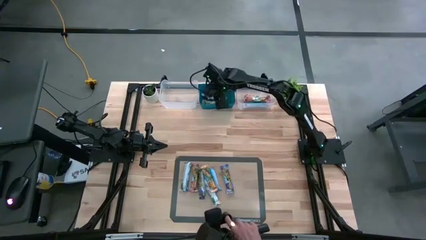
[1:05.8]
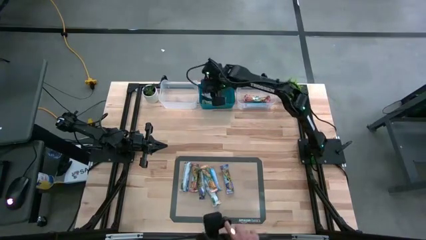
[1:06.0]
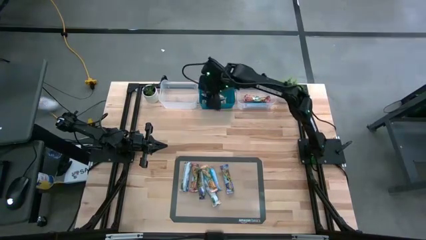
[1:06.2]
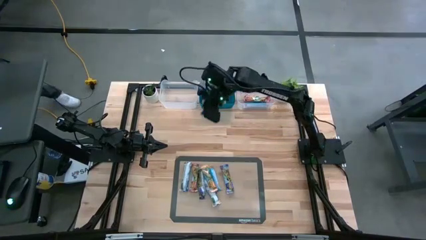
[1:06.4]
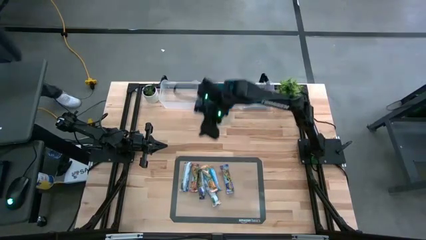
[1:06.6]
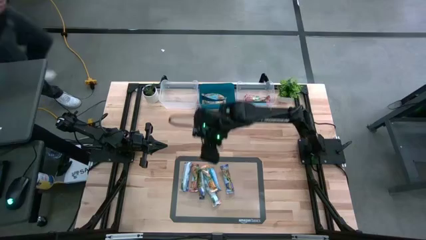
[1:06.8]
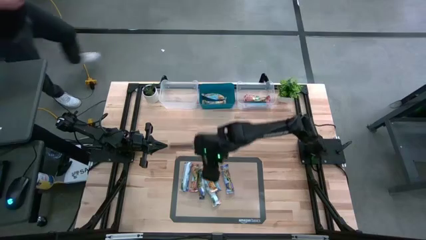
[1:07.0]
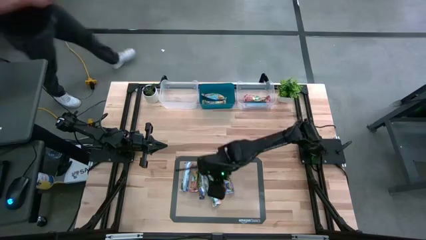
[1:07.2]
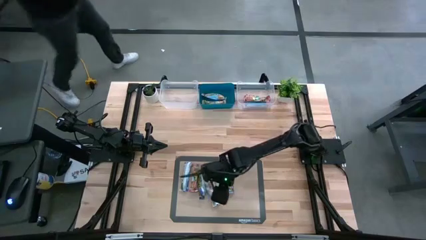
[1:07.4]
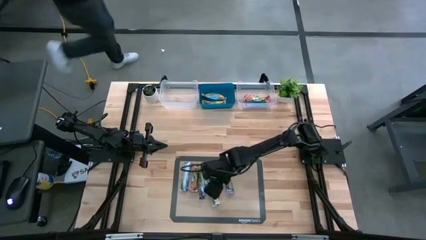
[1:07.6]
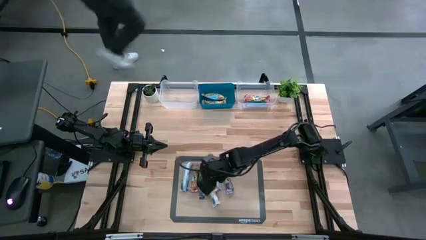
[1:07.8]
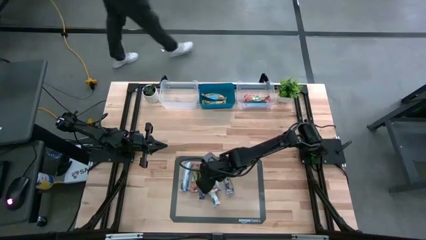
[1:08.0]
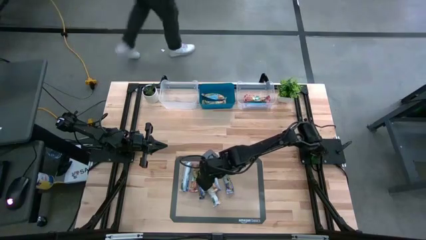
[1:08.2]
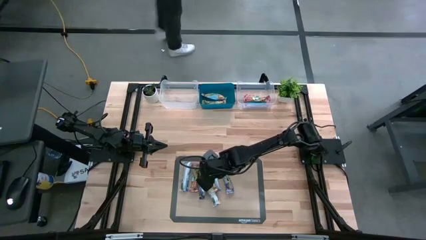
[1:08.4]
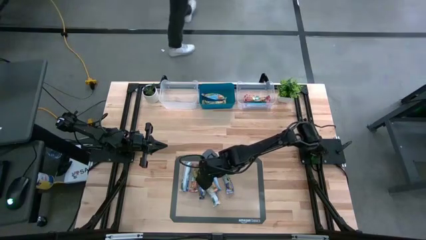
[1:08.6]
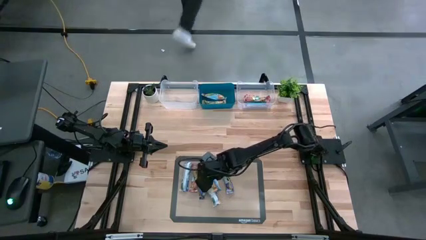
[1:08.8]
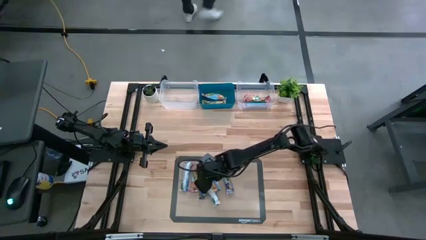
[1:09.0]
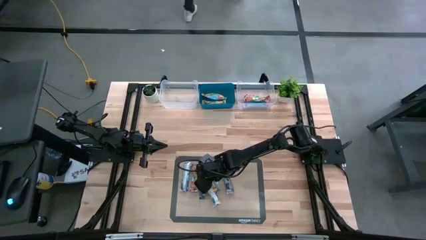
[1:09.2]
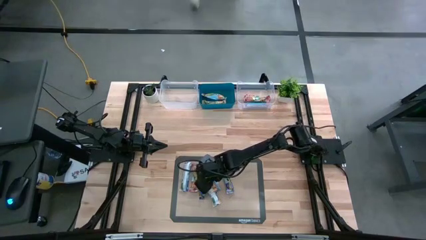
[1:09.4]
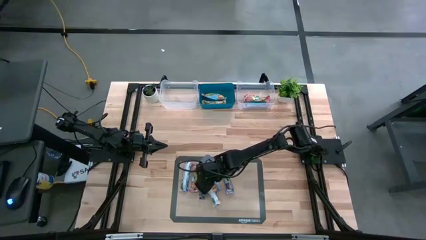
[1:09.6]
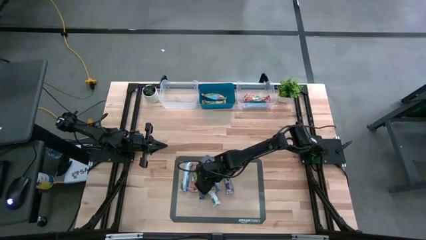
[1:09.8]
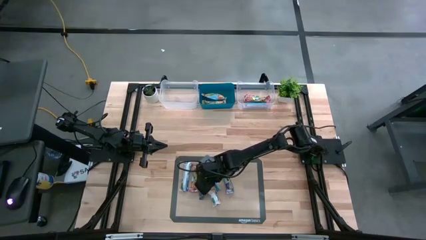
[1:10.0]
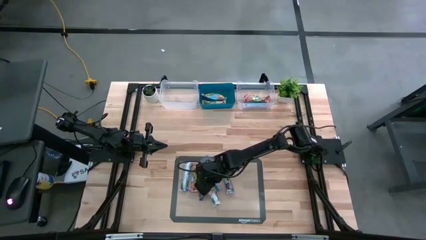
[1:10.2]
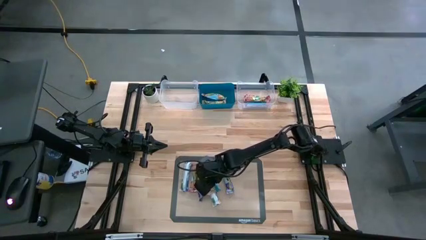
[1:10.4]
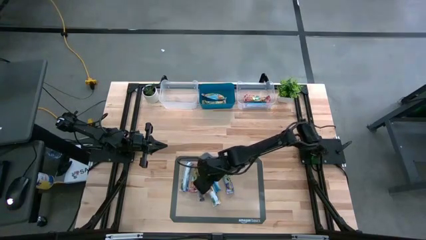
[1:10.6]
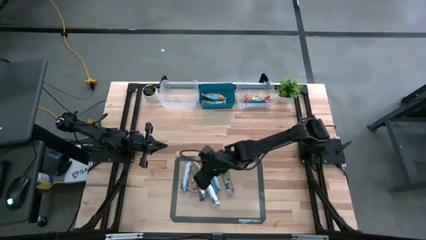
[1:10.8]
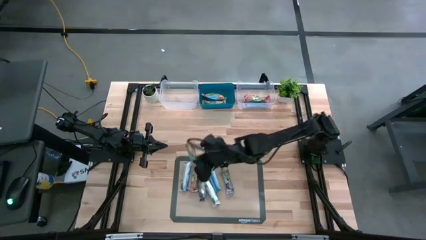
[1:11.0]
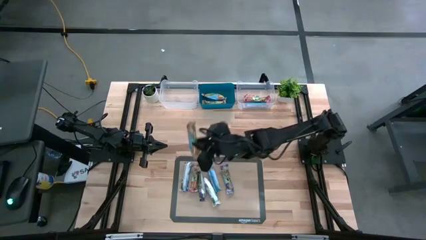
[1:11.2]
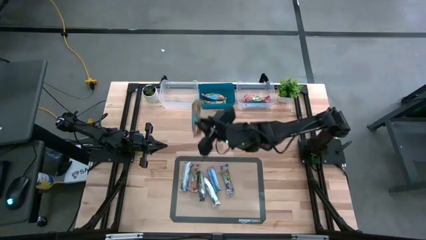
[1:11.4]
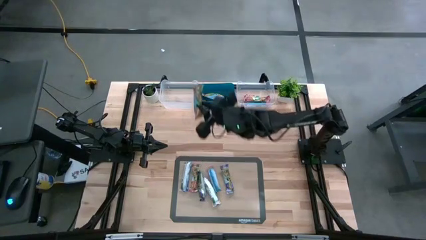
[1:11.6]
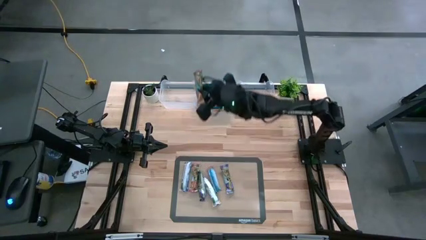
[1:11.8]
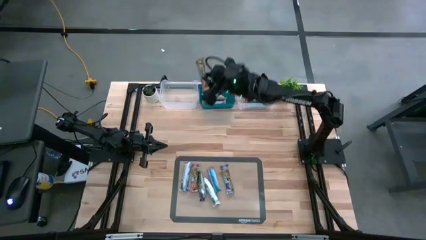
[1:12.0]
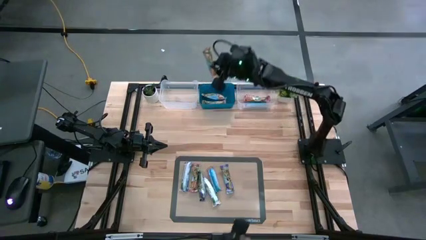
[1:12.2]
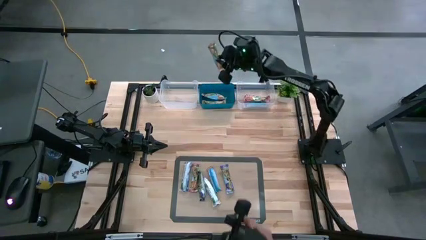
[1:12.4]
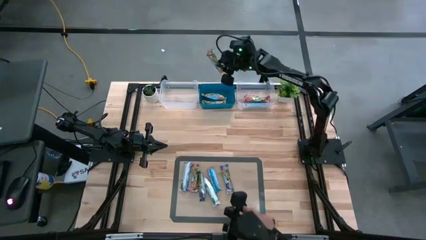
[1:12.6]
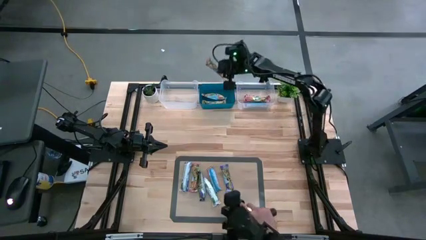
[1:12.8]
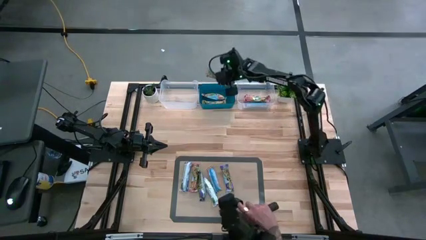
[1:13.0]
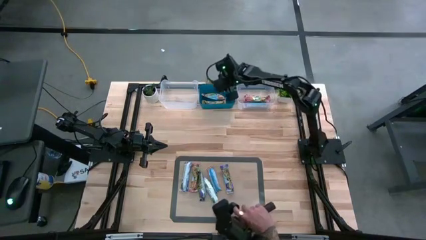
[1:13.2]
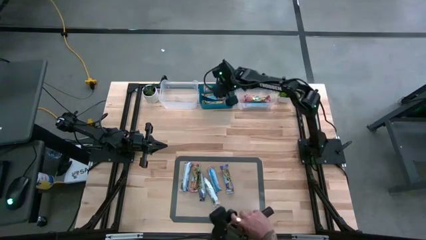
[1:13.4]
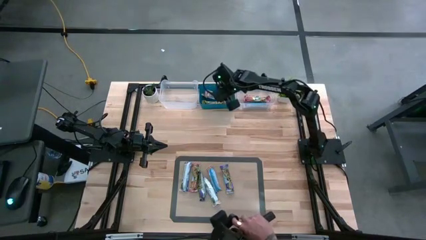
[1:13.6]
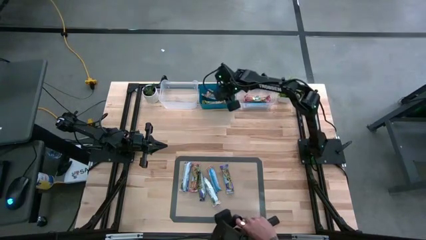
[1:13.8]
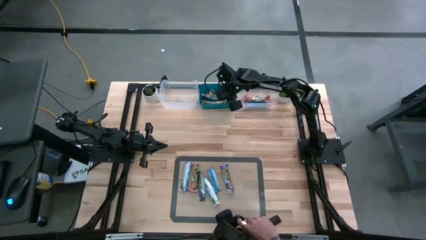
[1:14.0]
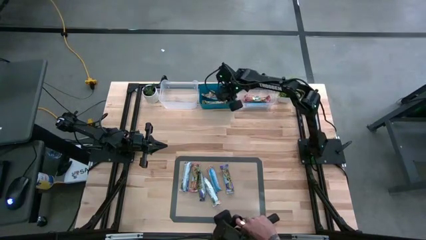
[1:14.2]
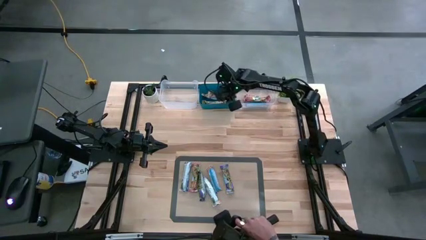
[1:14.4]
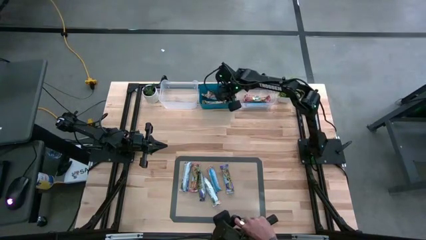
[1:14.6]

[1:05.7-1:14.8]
Task: Pick and place Granola Bars by type
Put the yellow granola bar into the blue bin

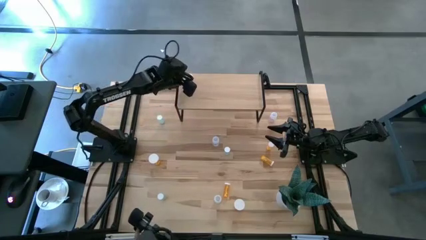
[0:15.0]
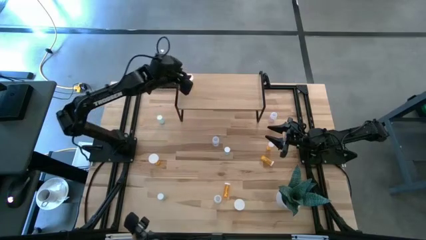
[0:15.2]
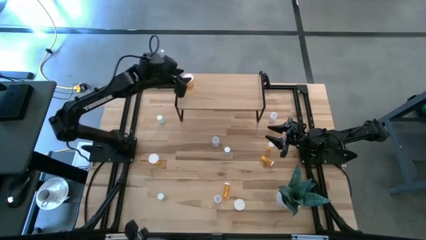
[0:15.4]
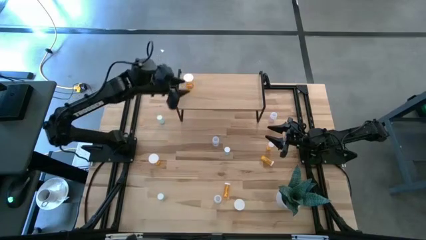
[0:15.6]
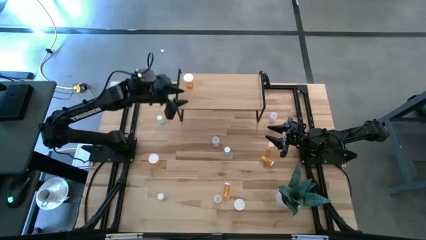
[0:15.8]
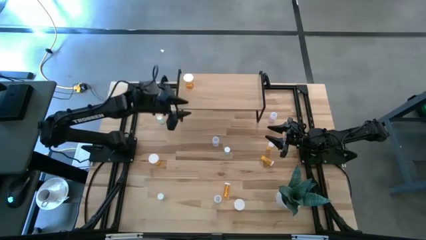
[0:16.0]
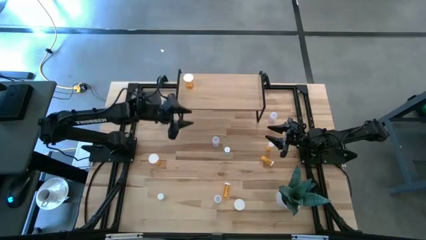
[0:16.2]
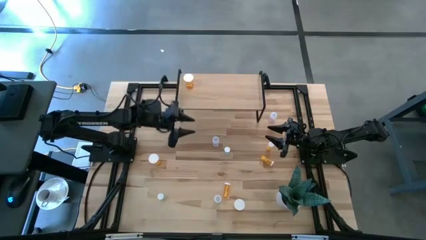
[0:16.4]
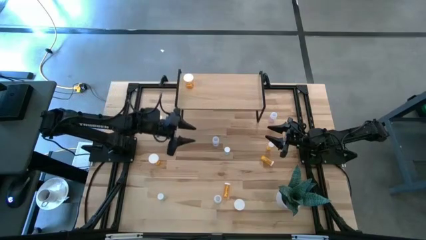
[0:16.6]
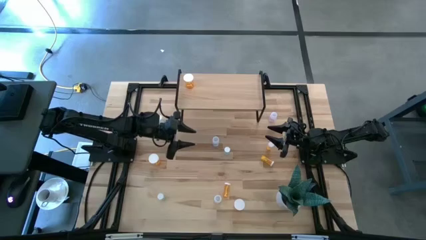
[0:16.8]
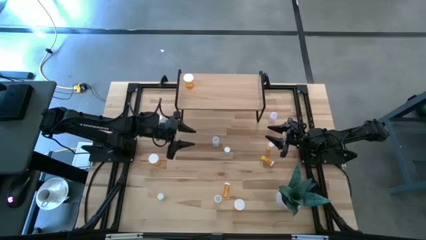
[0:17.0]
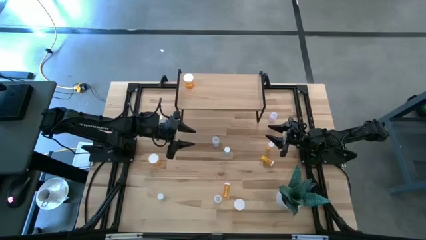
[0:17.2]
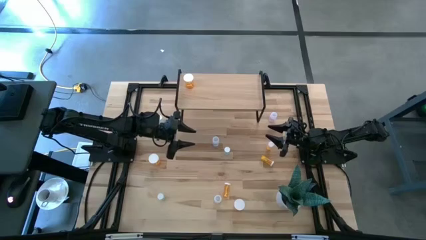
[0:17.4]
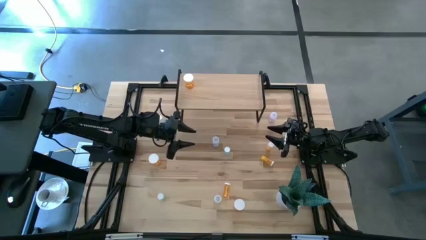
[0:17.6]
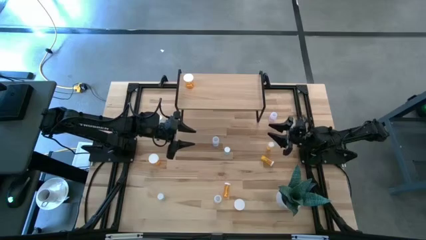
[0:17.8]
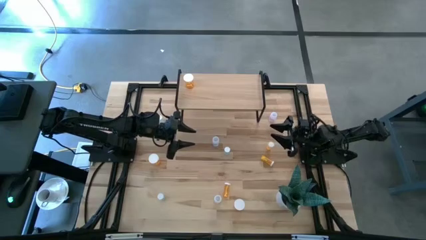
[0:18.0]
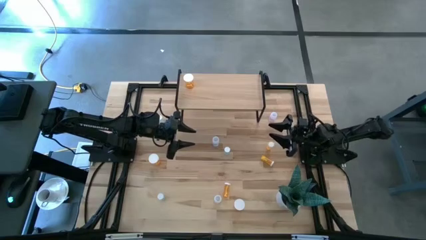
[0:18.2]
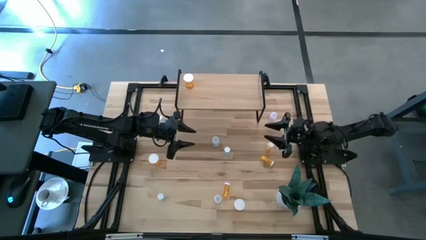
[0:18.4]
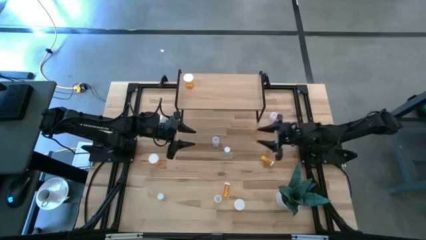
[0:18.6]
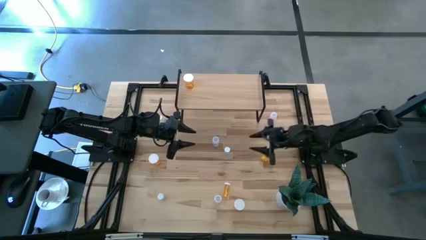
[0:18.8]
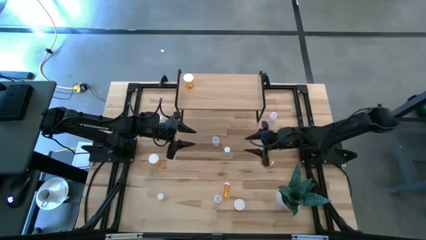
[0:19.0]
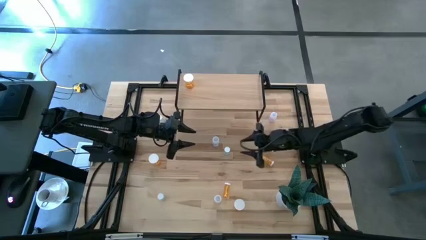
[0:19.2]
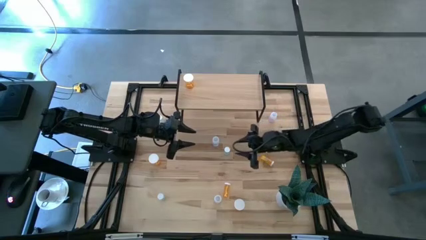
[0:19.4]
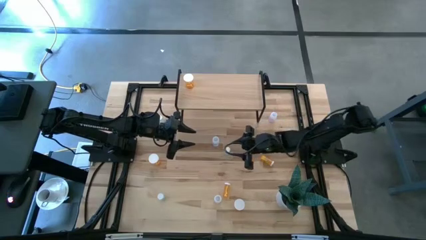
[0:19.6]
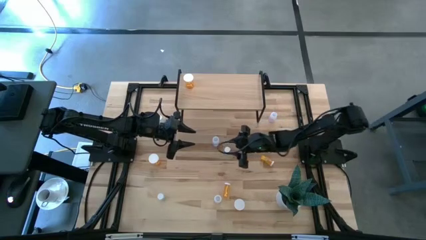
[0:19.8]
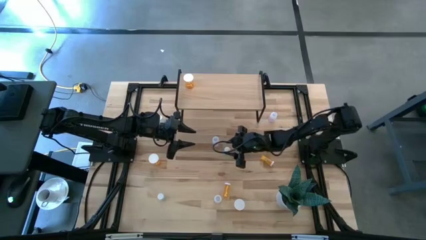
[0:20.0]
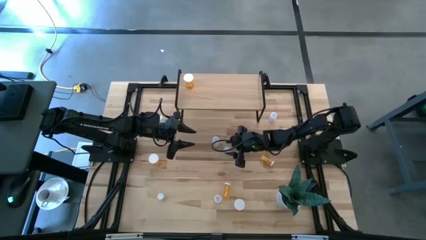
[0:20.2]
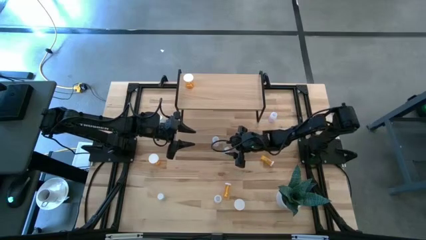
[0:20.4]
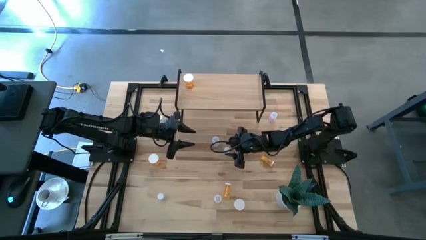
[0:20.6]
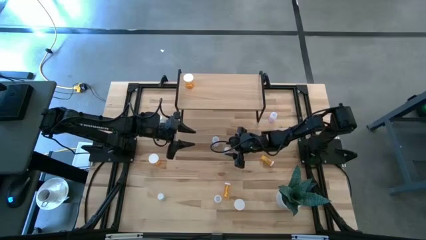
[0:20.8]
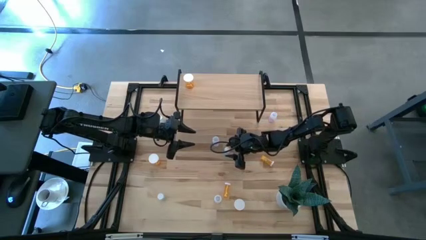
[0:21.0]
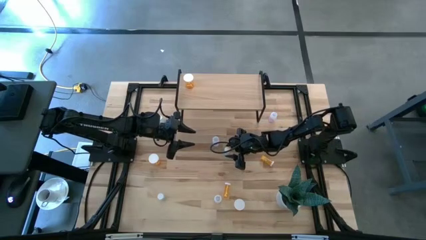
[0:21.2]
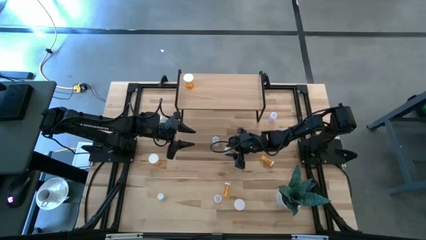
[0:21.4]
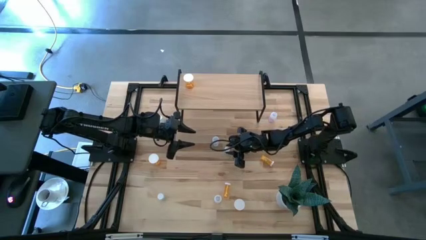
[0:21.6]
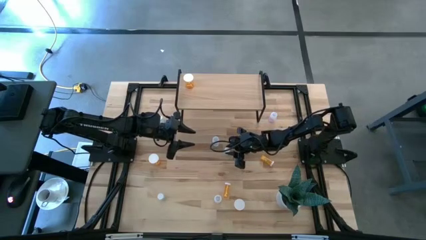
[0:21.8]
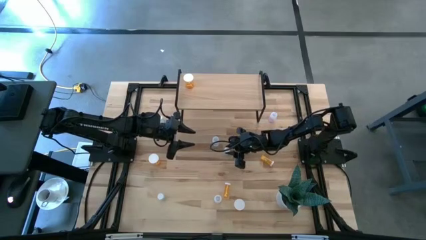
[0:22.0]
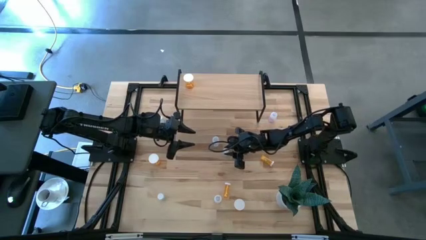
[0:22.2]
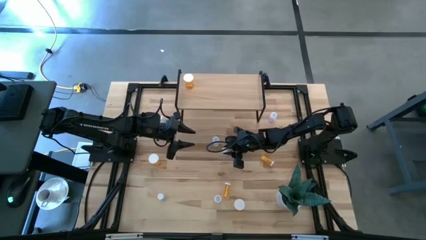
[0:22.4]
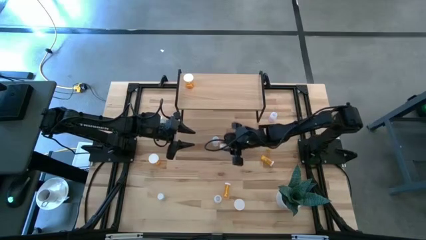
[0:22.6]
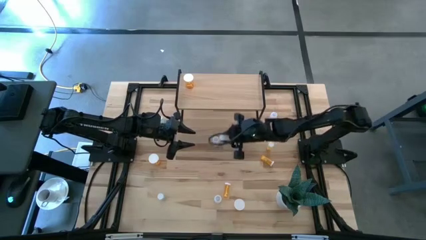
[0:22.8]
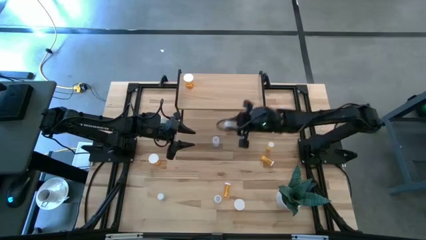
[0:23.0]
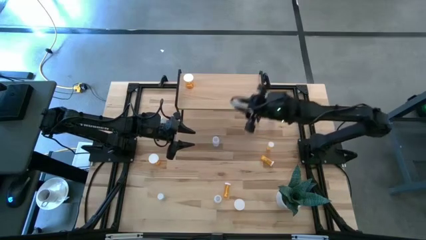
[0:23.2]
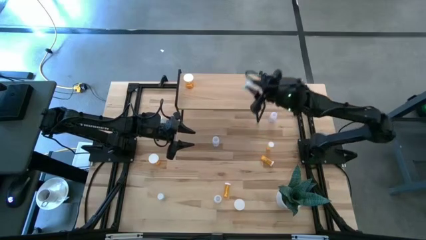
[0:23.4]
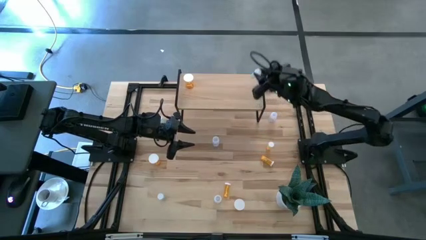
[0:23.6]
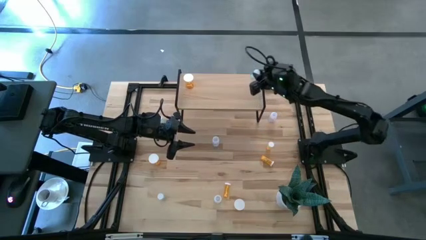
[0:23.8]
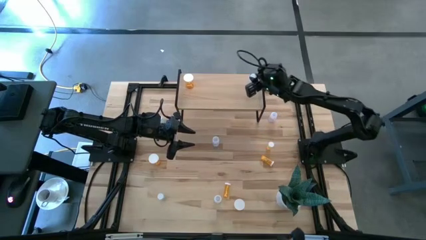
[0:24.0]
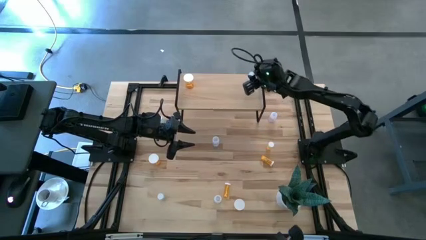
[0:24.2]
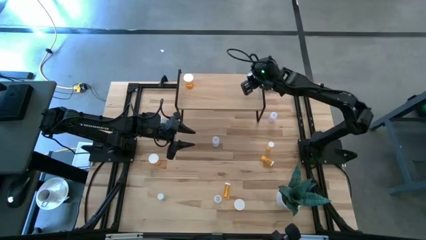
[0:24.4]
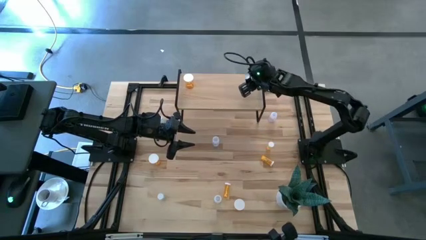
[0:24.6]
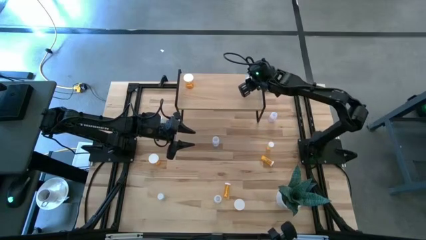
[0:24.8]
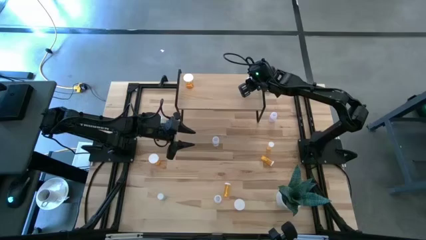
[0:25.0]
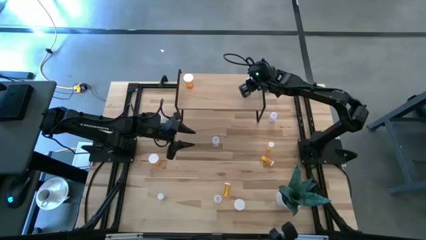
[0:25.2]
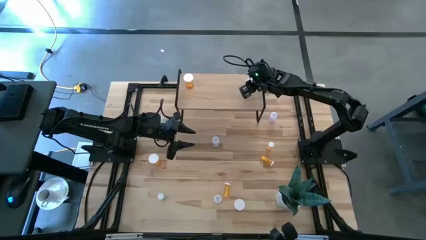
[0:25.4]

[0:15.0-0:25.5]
Task: Pick and place medicine bottles onto shelf by color
Put the center dark green pill bottle on the shelf
